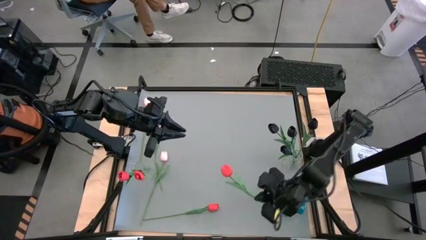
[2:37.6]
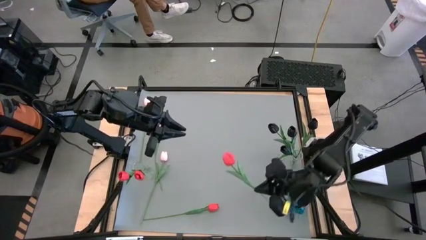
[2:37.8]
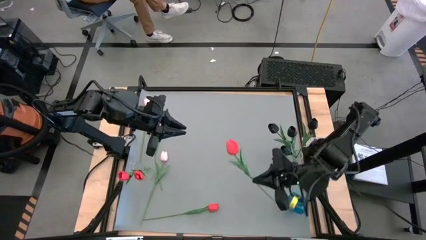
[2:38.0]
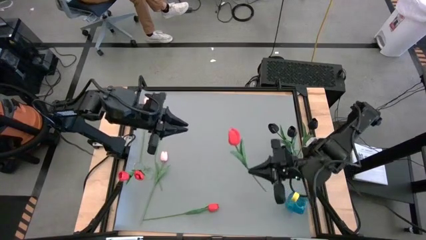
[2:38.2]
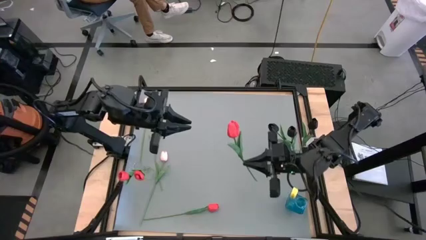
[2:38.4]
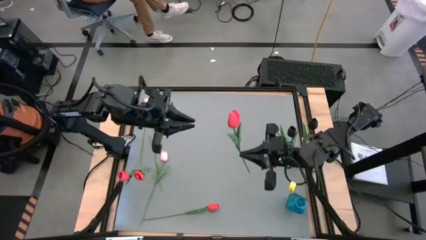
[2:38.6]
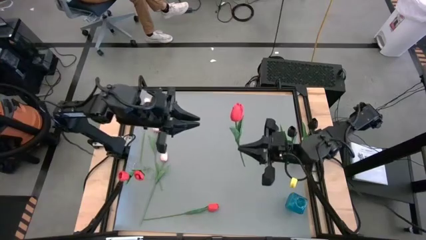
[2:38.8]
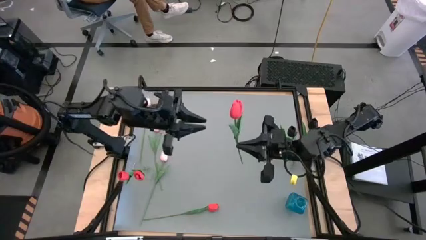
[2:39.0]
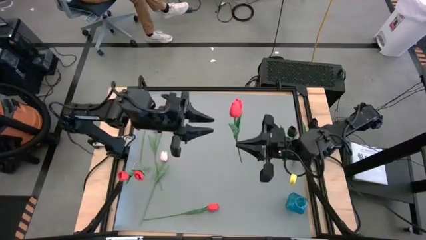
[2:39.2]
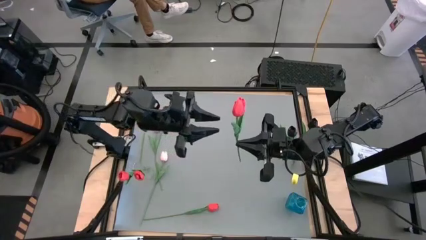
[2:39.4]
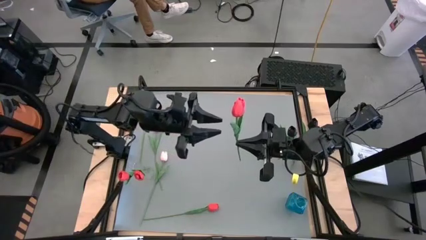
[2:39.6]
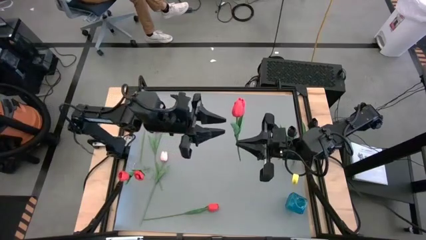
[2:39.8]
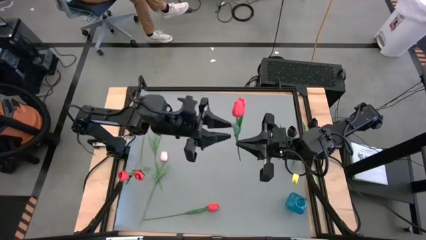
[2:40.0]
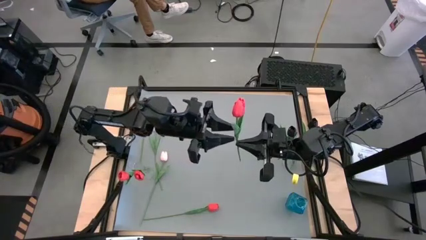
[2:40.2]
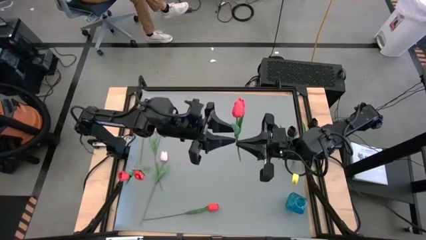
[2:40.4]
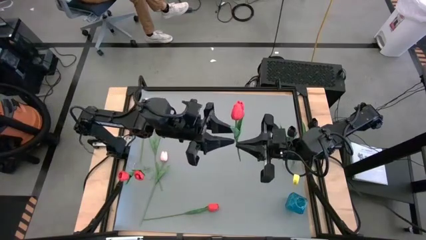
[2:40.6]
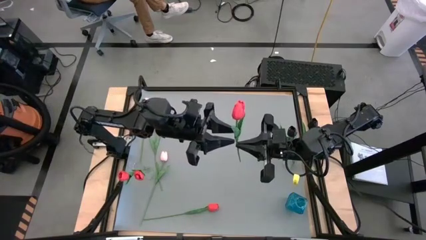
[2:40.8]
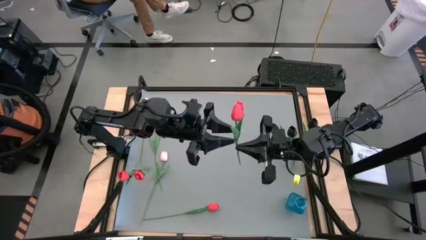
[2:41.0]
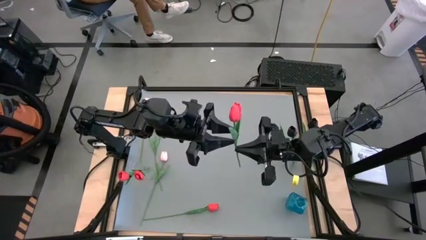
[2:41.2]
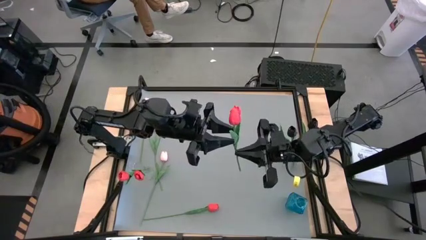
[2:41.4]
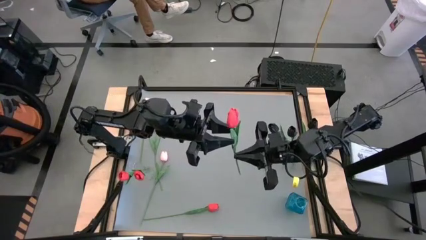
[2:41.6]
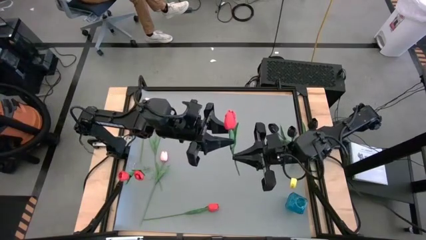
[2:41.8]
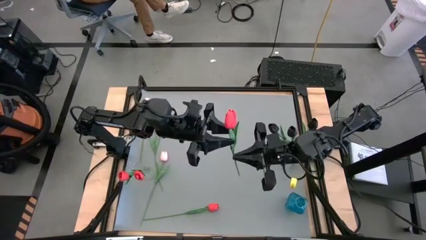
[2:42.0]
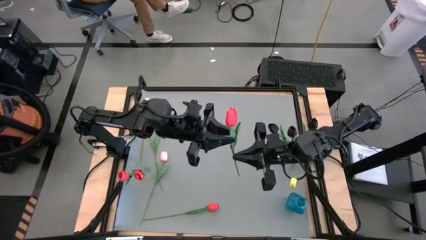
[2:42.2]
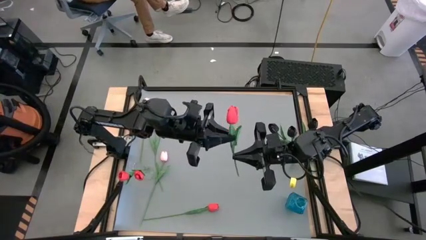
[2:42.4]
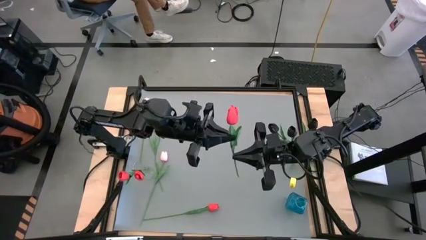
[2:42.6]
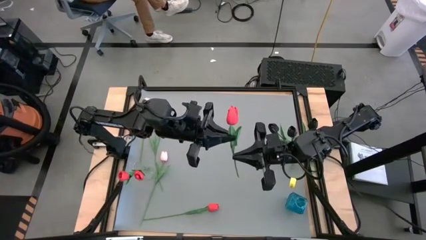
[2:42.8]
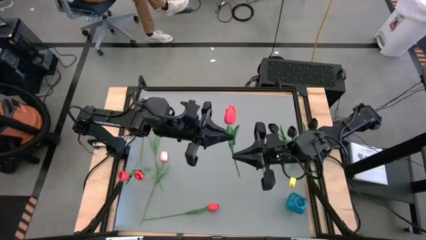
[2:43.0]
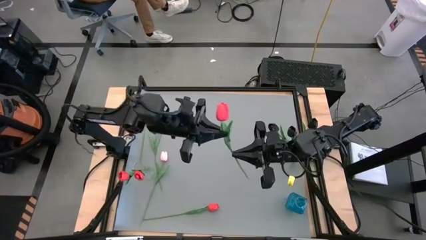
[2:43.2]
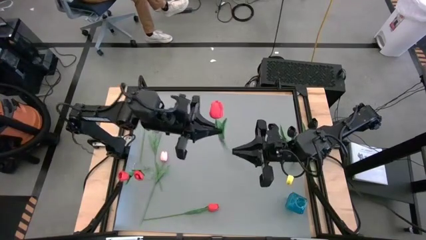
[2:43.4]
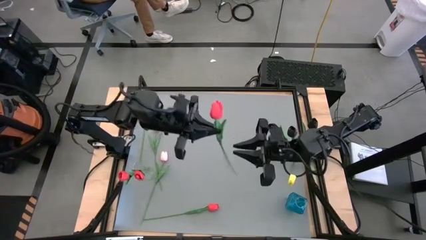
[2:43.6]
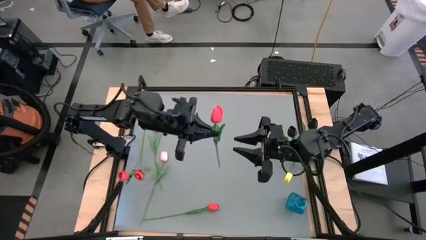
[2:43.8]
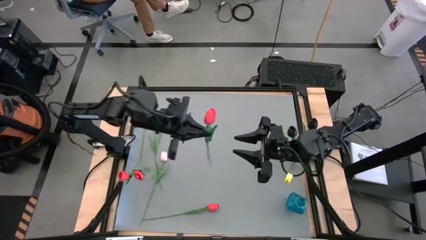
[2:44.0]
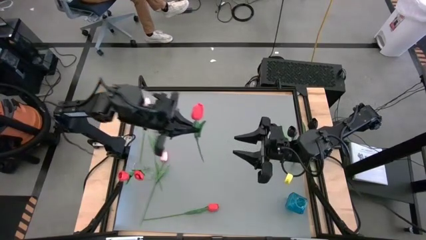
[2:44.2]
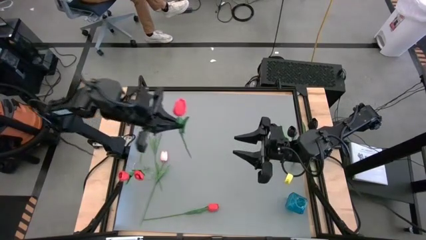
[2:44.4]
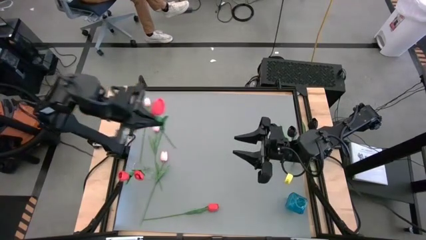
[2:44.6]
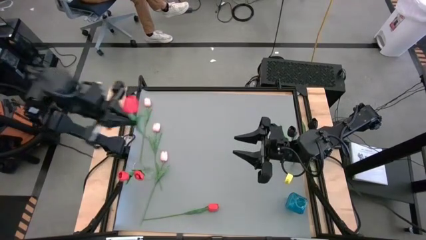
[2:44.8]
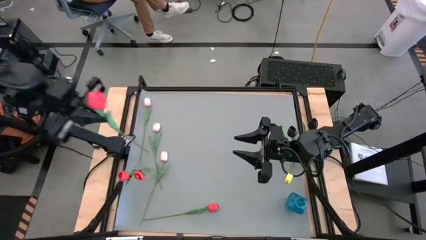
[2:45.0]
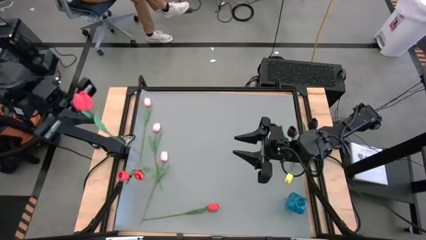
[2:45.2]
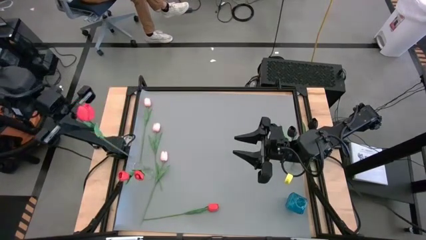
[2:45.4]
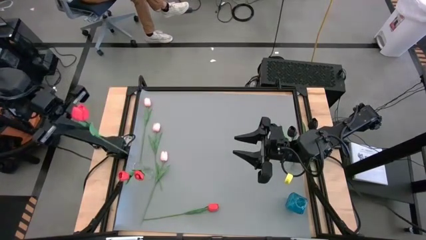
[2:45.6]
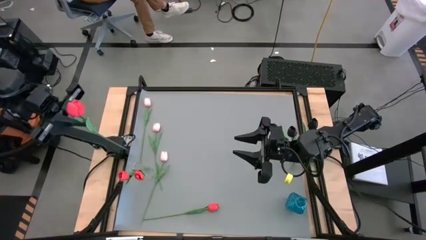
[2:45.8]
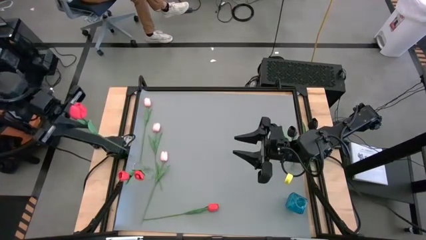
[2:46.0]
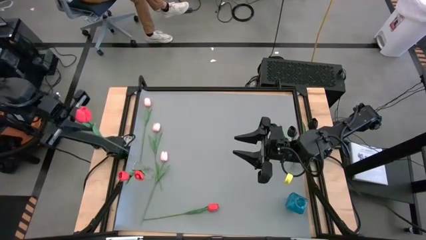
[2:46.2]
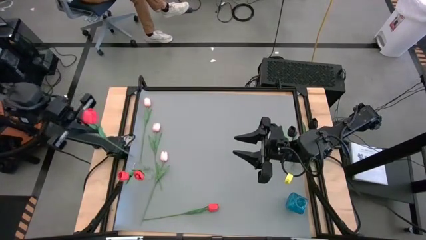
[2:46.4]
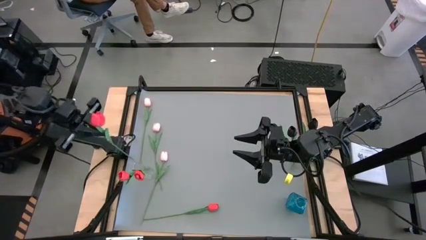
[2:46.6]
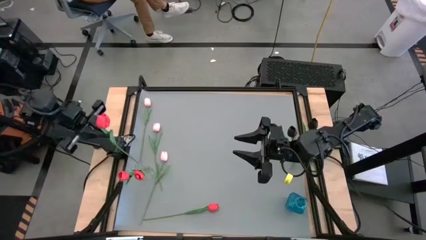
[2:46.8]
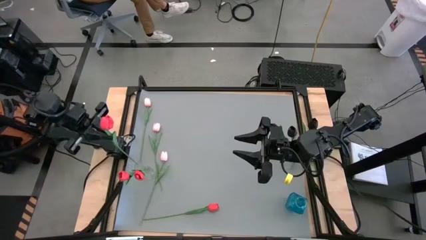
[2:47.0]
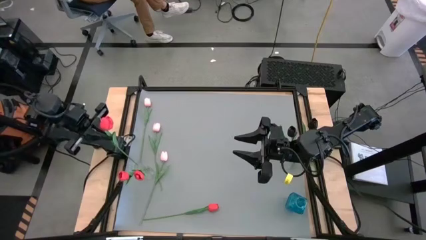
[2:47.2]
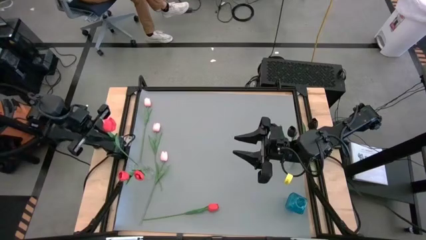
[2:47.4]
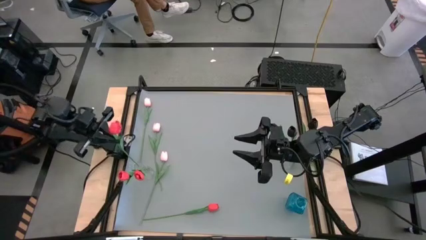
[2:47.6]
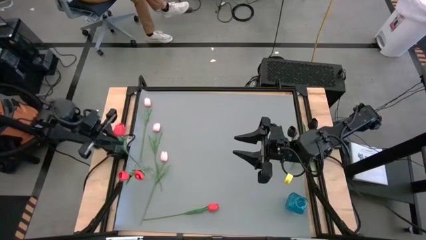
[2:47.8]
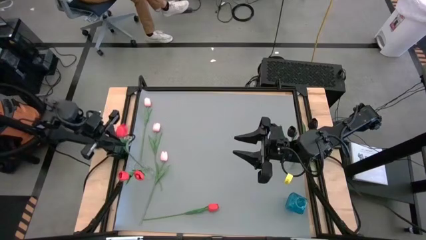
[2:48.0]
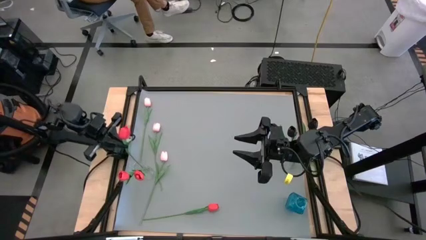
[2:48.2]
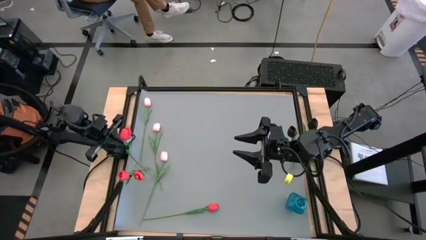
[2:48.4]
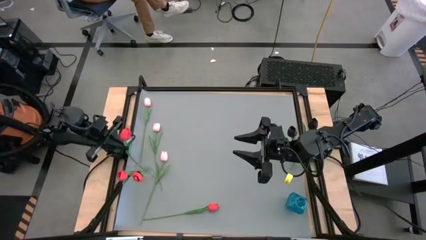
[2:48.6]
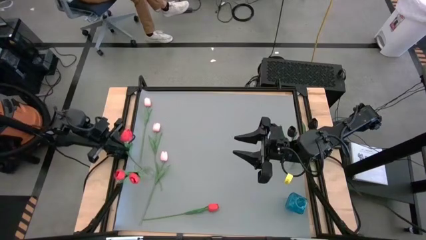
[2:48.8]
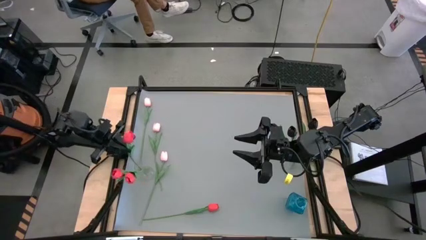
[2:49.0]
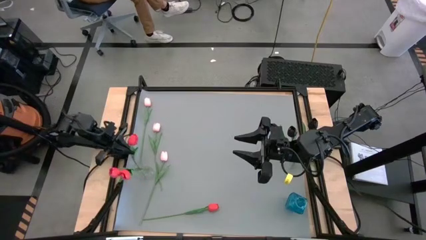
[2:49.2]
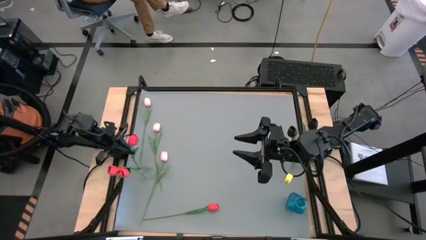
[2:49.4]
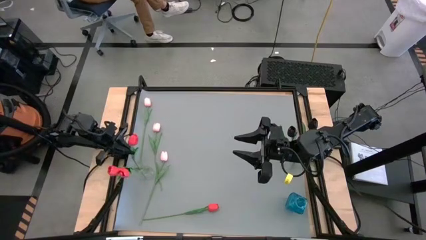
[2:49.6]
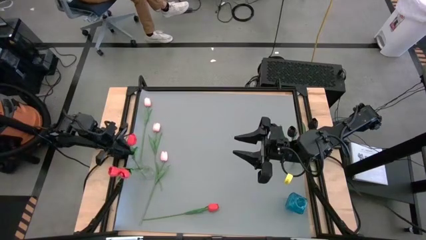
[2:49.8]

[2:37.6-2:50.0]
Task: Sort flowers into vase by color
Put the right red tulip into the left transparent vase

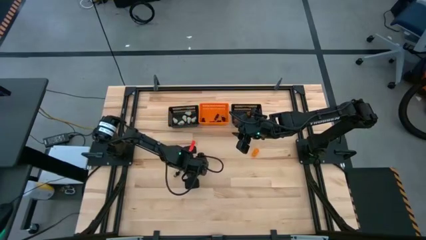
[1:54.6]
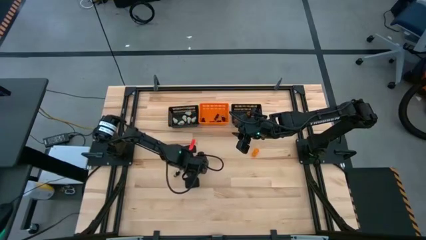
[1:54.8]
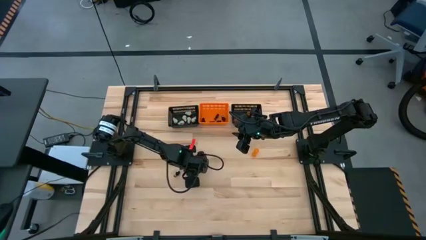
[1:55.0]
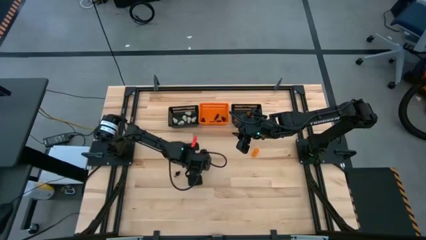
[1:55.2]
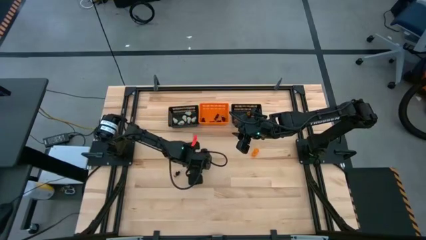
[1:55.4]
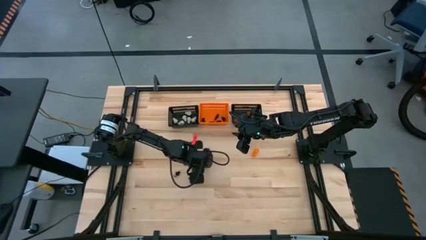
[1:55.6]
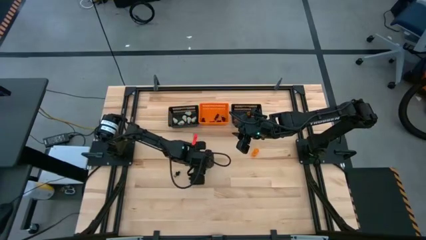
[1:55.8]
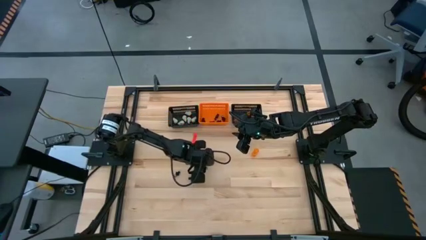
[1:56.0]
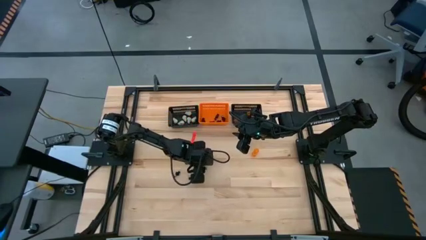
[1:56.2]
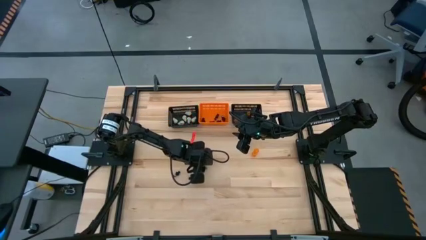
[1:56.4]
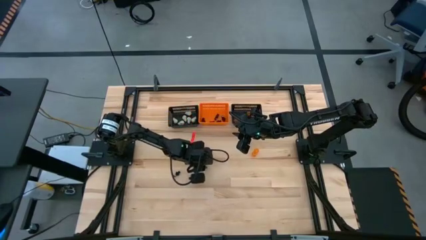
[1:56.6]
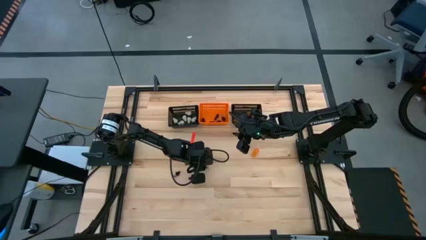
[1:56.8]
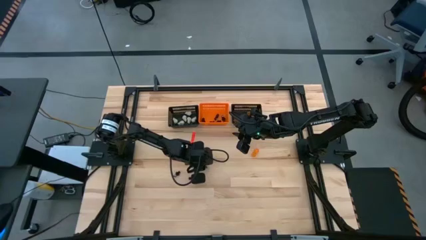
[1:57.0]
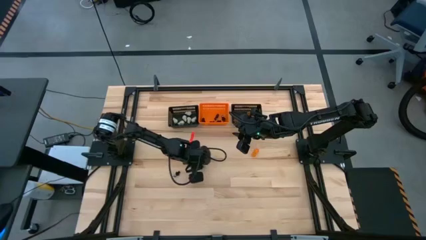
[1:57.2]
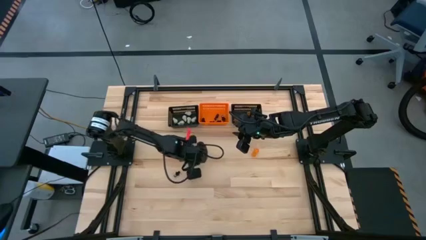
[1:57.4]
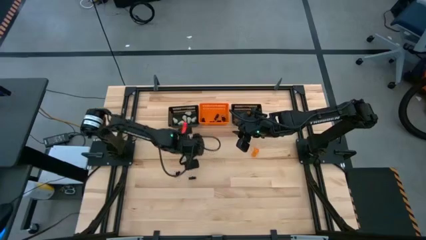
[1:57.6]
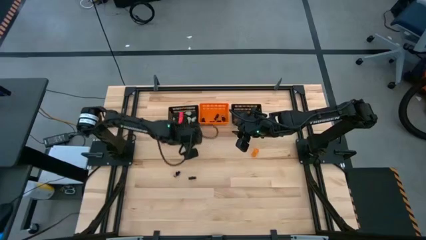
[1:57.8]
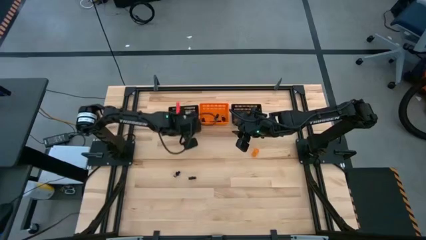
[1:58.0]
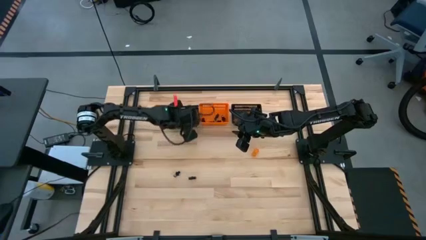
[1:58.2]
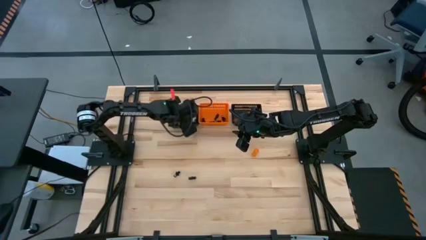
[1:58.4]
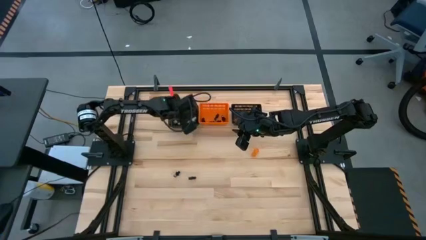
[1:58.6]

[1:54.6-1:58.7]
Task: Sort Halloween decoration
Put the white skull toy into the left black bin
